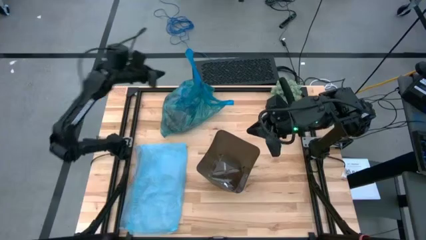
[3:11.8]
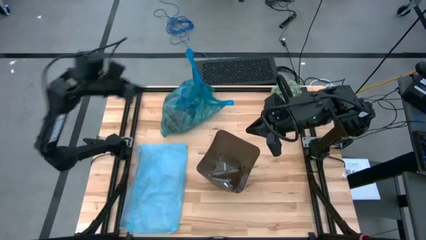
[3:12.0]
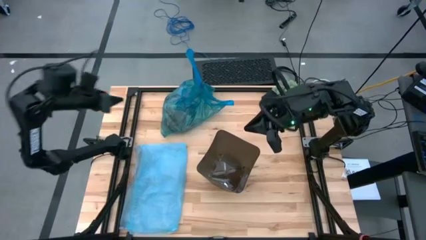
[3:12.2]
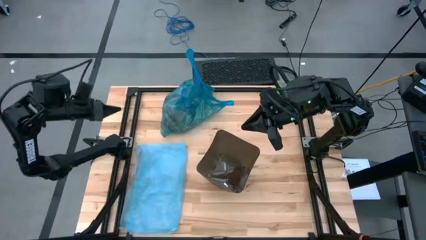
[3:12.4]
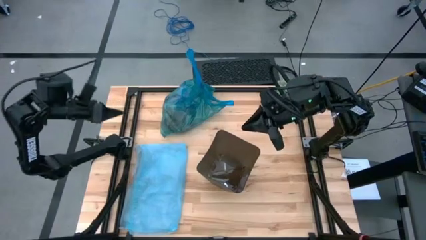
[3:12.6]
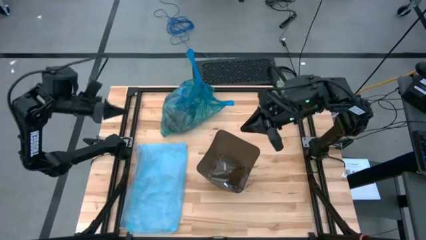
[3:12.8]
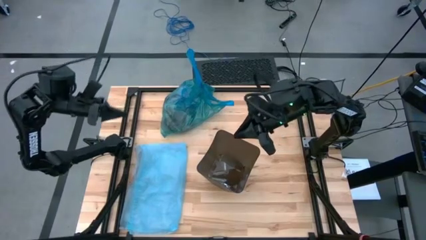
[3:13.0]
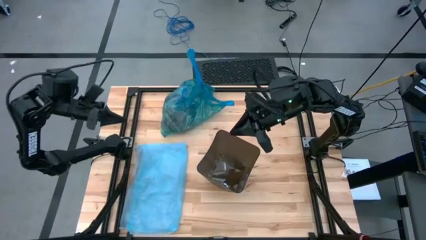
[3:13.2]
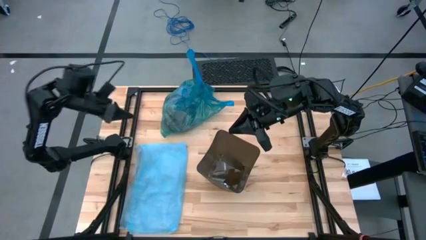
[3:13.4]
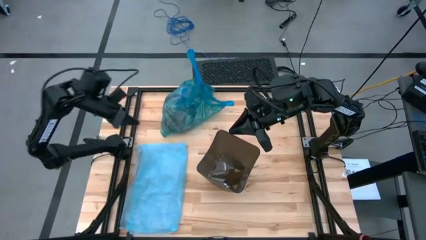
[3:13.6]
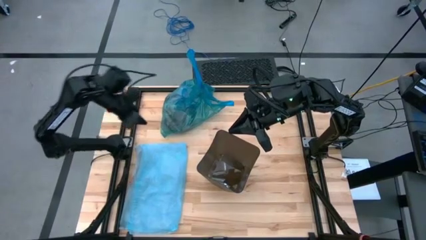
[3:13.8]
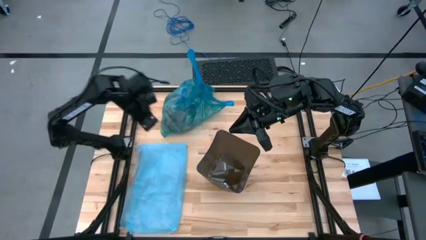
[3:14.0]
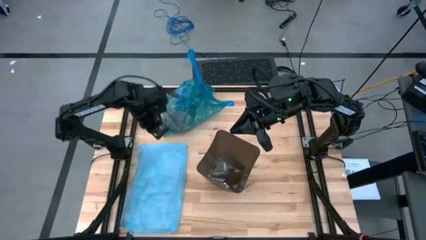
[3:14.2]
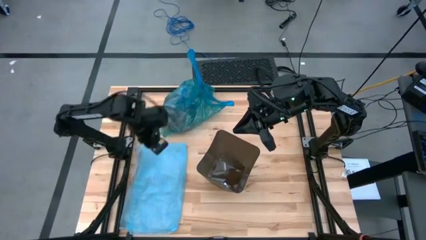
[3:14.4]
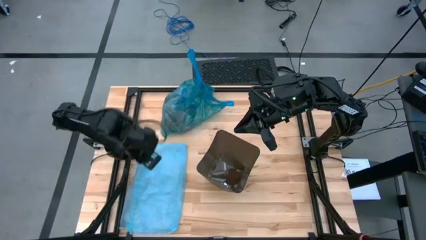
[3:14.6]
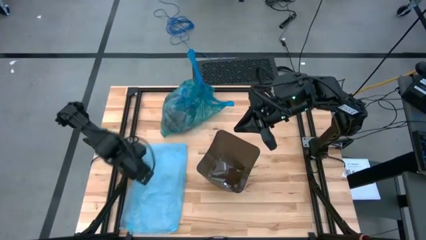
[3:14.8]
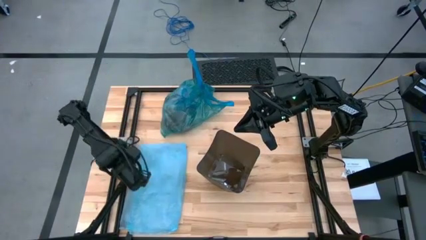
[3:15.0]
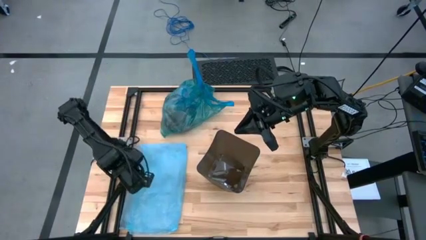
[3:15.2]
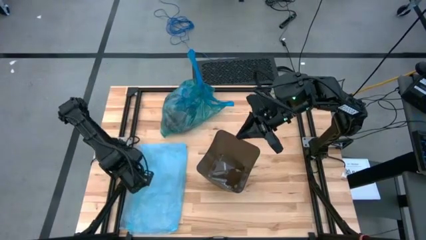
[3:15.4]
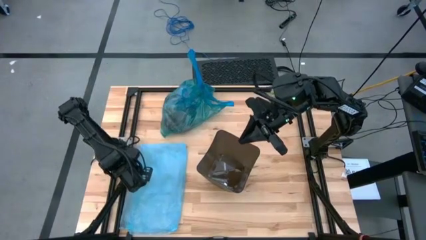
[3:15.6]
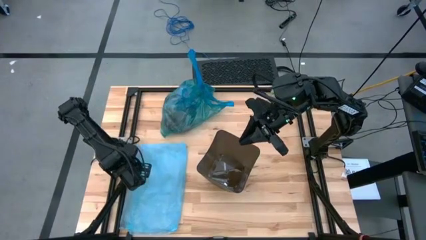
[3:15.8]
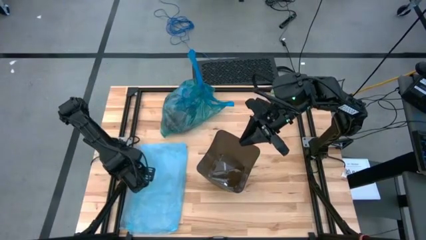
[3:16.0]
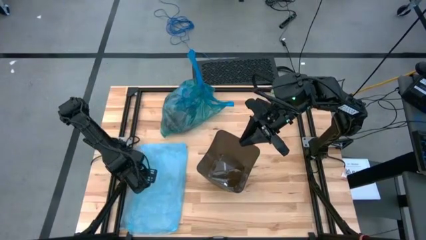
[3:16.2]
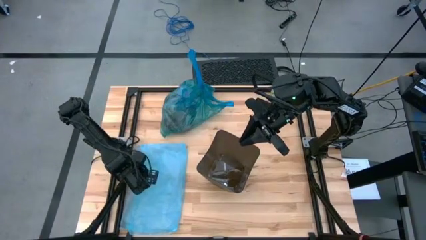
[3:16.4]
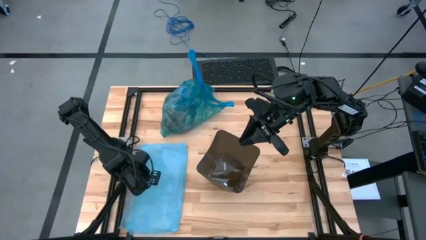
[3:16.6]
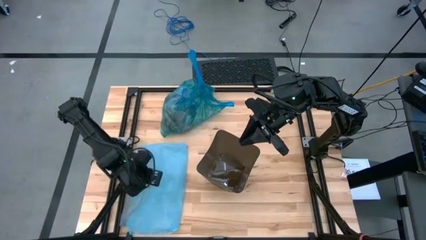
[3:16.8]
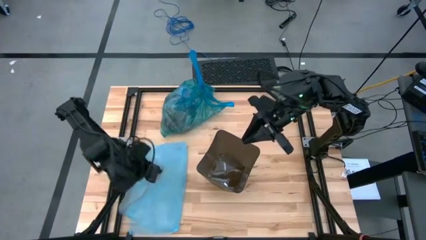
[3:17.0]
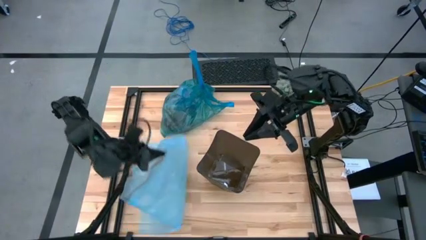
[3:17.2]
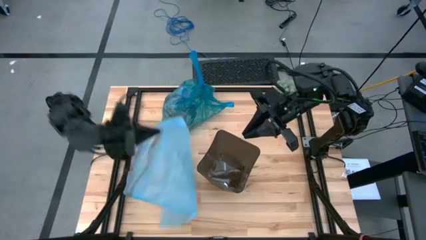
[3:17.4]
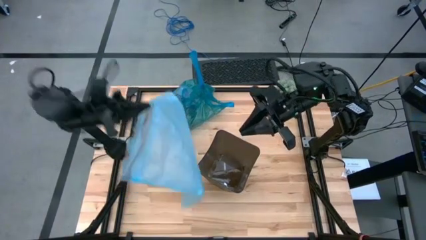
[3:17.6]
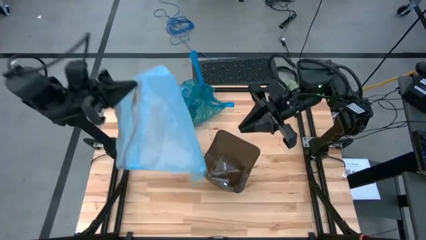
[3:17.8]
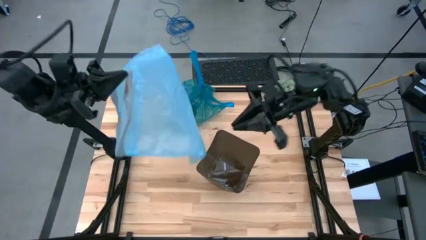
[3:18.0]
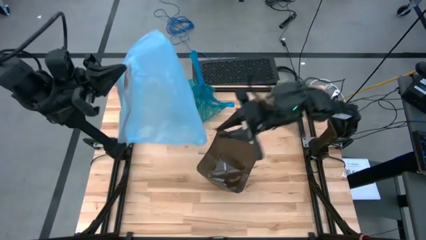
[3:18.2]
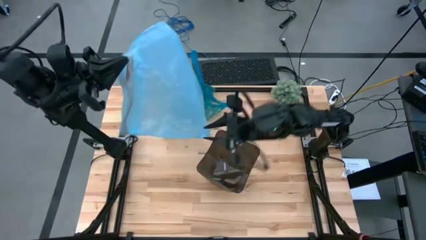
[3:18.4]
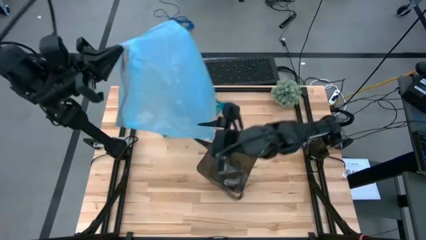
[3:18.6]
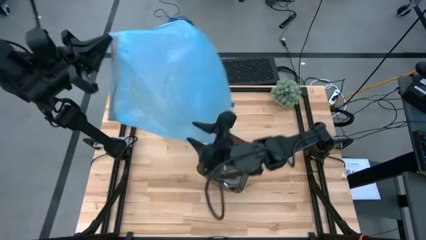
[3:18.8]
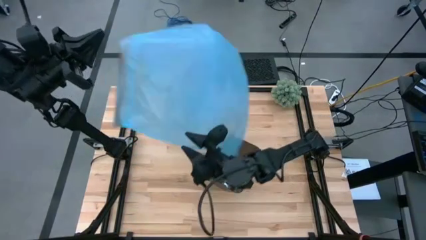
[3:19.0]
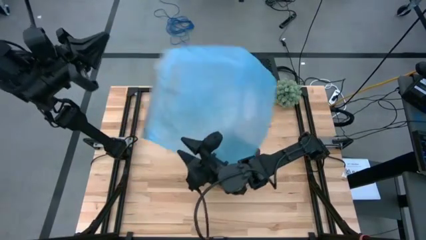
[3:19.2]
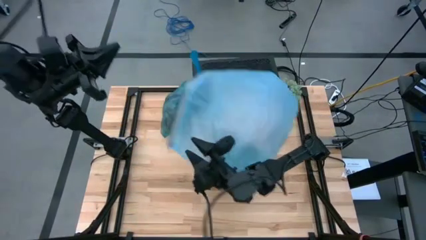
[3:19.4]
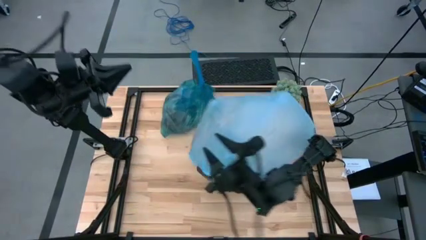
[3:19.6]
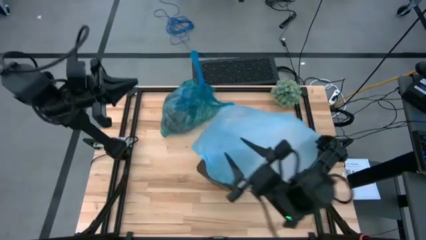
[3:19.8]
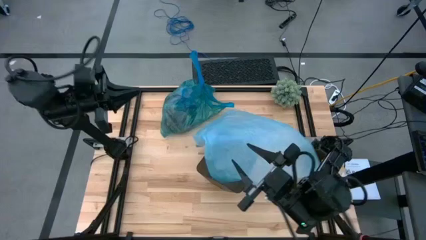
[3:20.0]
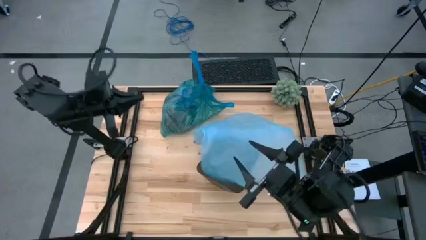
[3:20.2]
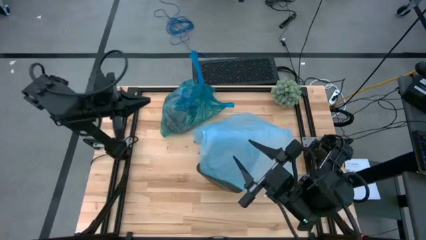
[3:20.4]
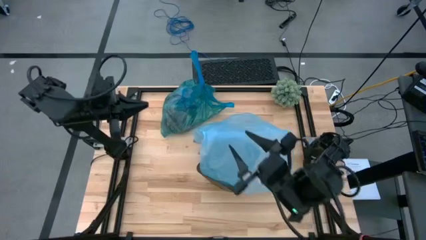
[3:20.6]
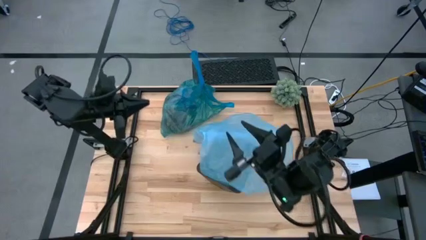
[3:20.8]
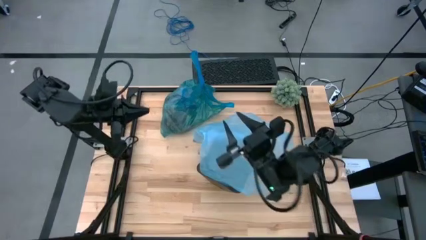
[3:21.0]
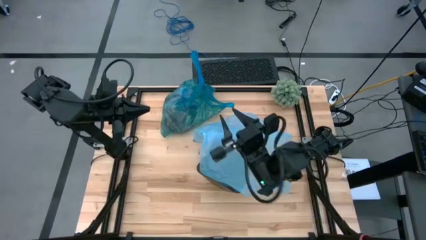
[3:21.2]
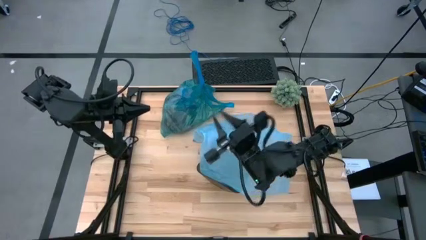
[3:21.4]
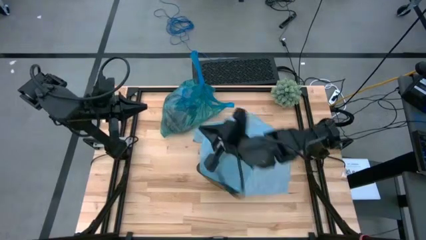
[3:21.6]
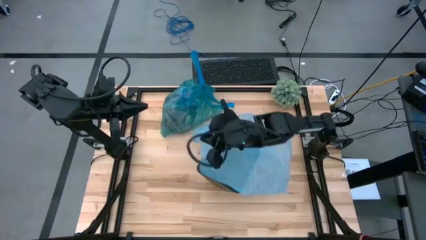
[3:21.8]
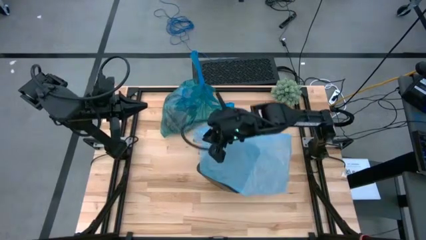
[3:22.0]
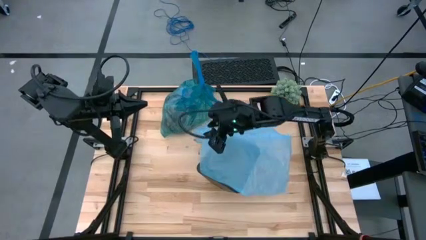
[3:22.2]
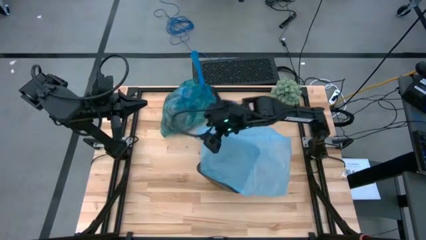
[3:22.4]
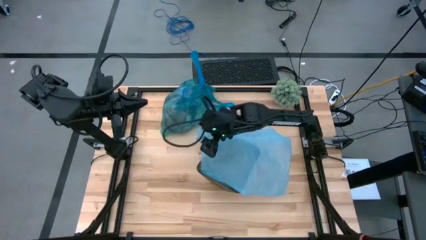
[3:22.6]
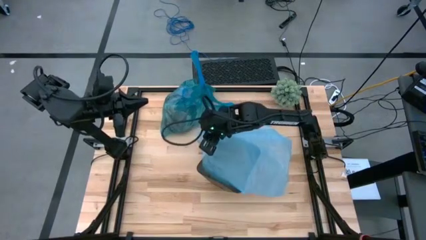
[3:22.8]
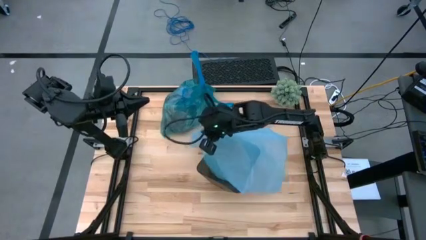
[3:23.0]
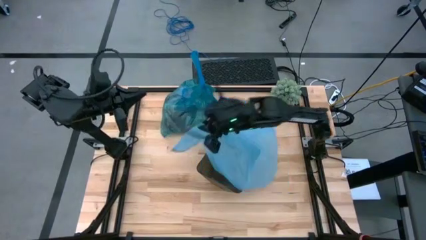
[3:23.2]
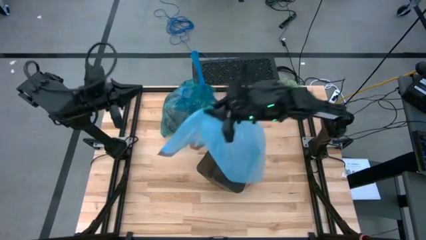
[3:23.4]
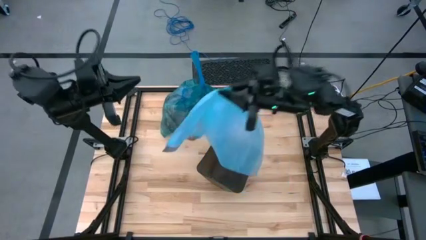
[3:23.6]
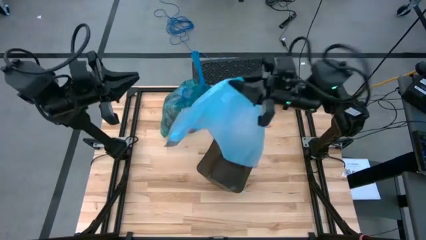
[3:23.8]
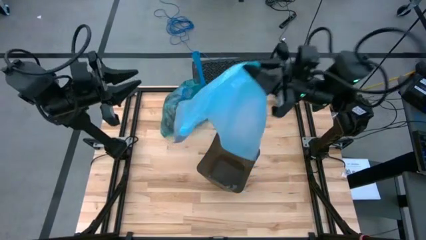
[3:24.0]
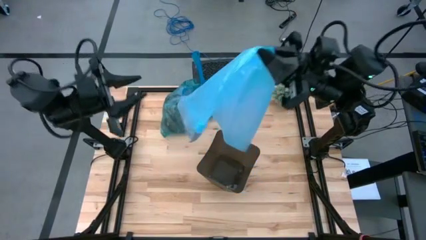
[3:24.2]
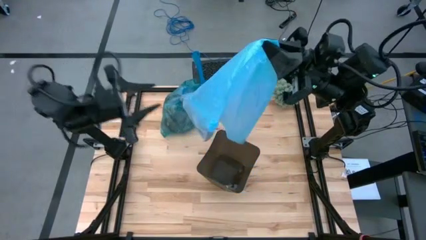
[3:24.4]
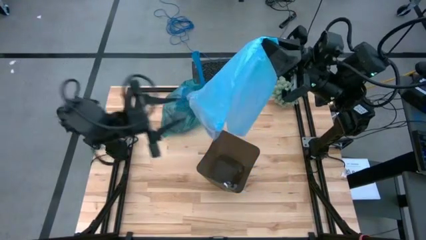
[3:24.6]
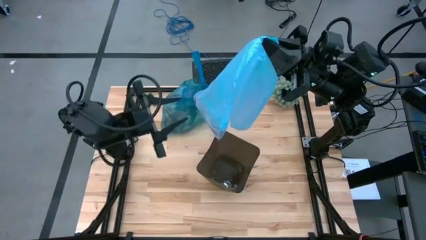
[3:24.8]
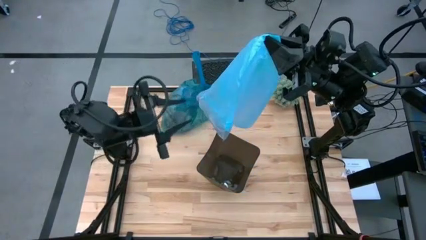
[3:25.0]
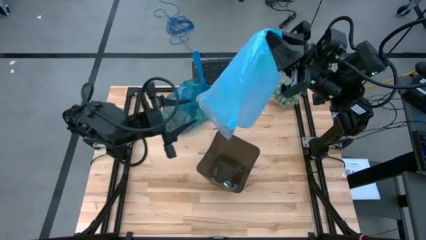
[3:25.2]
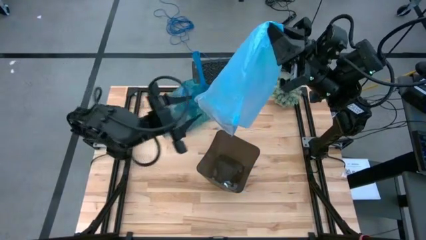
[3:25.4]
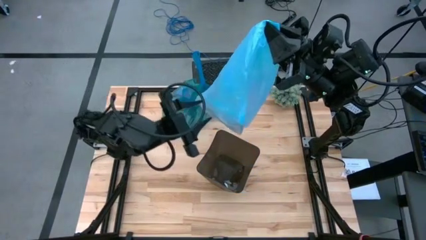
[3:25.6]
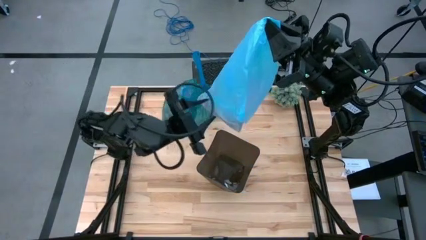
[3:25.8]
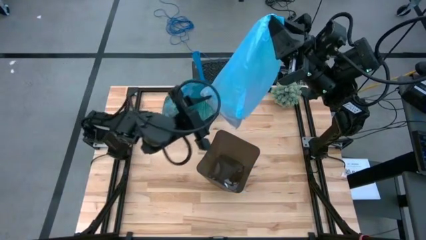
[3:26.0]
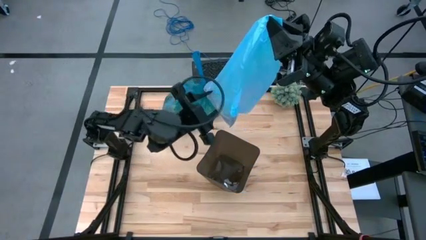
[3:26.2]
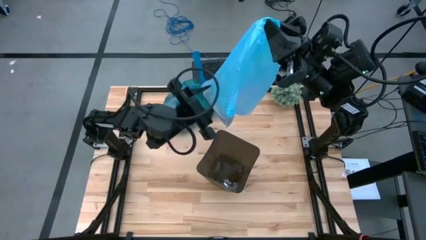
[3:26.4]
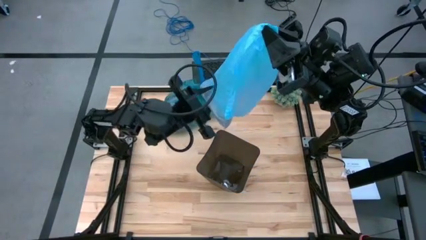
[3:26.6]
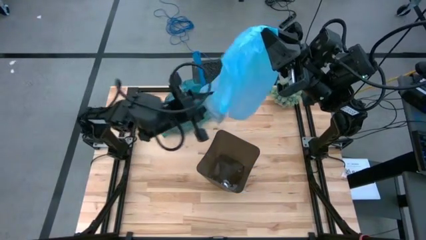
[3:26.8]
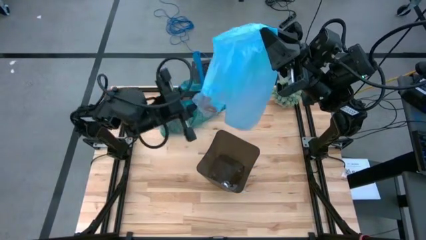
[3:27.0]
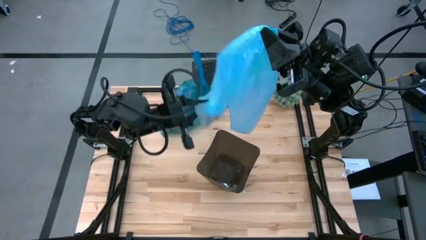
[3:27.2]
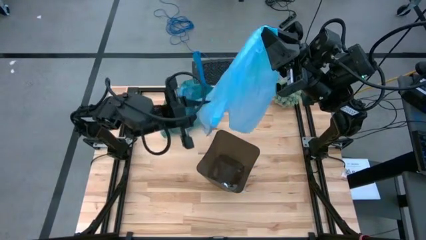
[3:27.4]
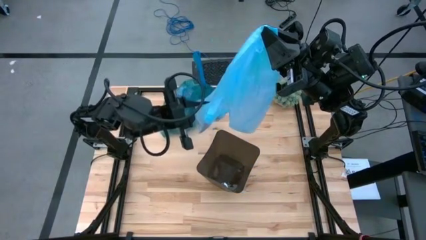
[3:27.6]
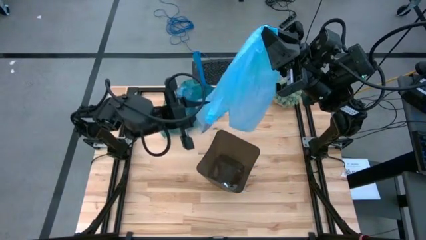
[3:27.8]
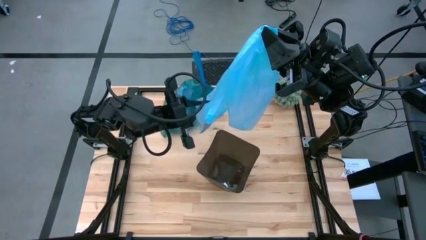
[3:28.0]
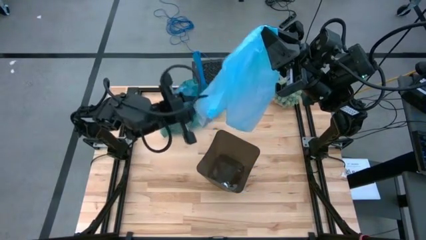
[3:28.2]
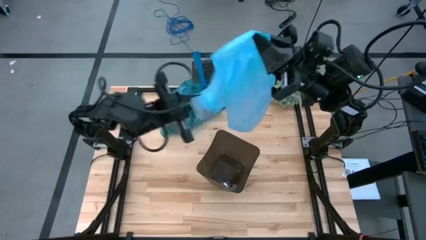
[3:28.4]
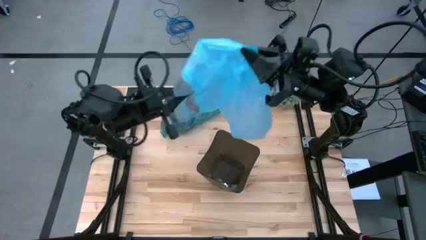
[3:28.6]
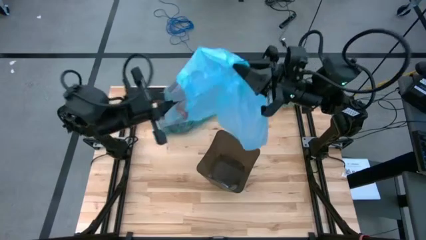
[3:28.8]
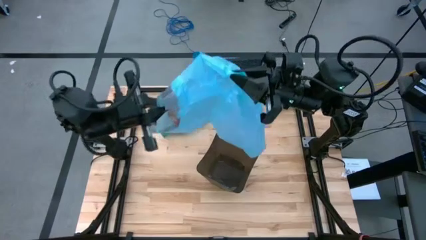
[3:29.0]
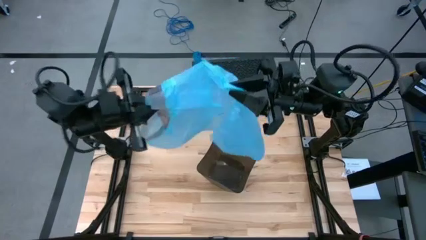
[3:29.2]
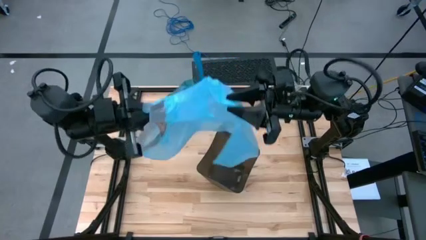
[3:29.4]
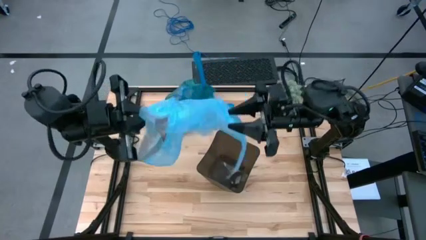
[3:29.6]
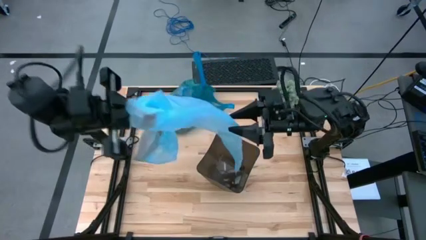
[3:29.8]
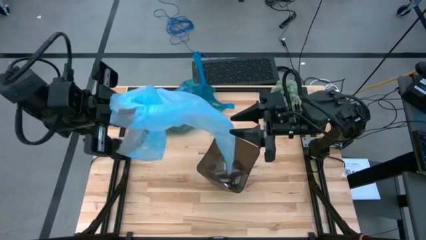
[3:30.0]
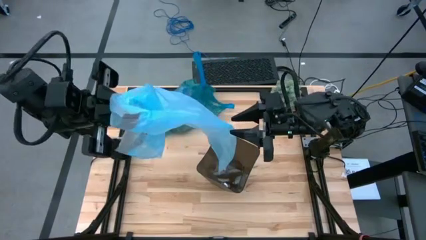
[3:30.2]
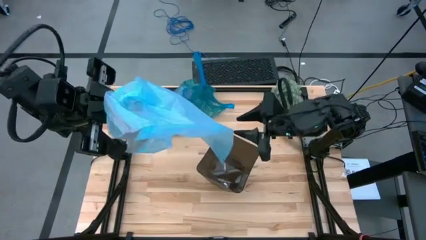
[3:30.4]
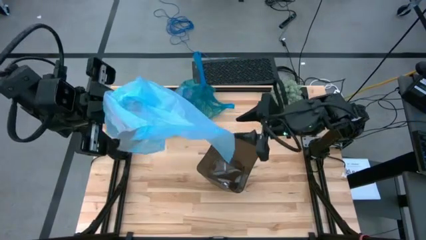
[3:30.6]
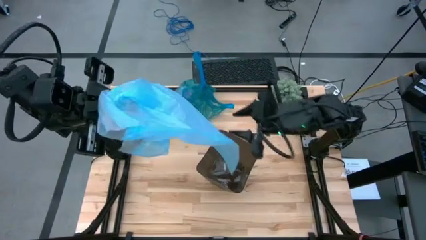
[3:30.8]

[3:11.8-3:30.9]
Task: place trash/remove bag and relplace
Insert the new trash bag into the trash bin
